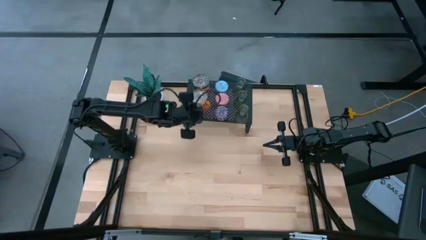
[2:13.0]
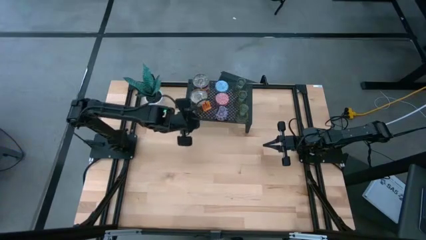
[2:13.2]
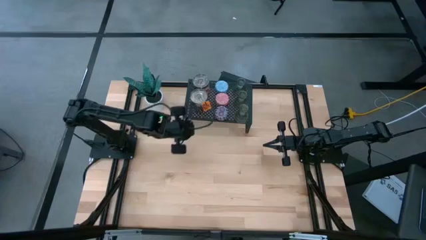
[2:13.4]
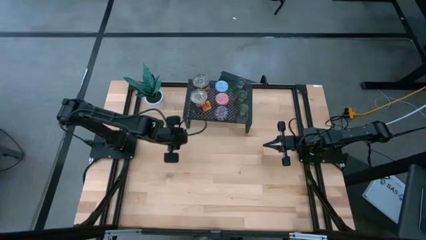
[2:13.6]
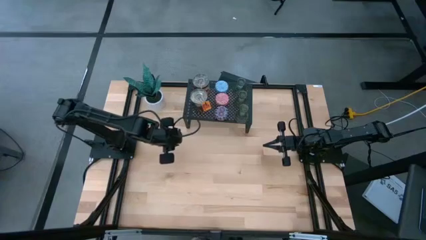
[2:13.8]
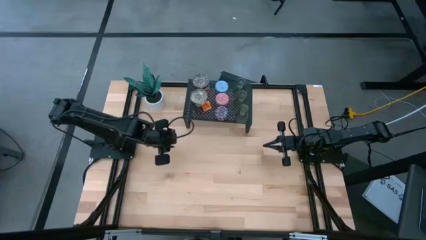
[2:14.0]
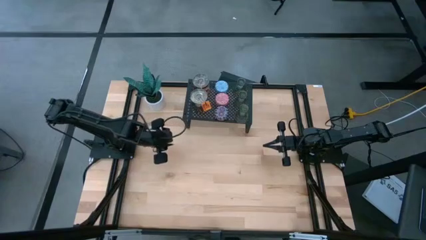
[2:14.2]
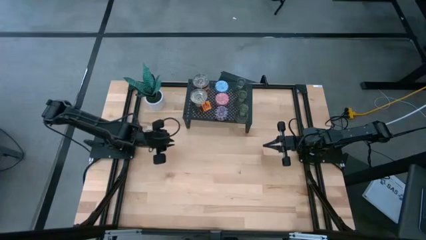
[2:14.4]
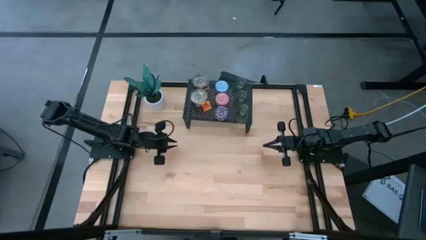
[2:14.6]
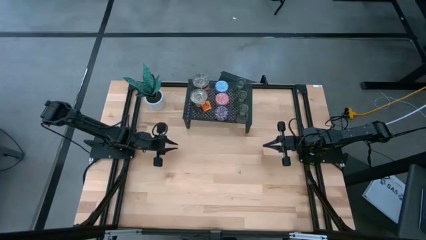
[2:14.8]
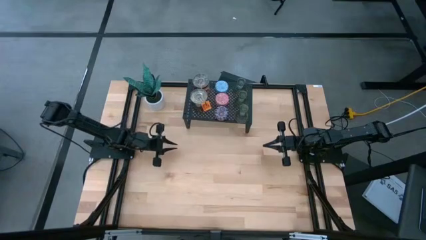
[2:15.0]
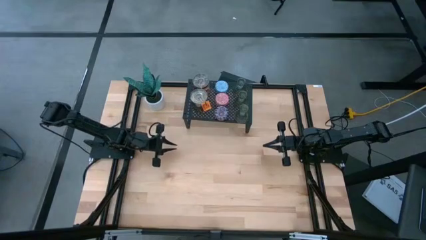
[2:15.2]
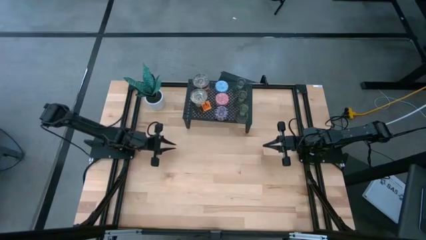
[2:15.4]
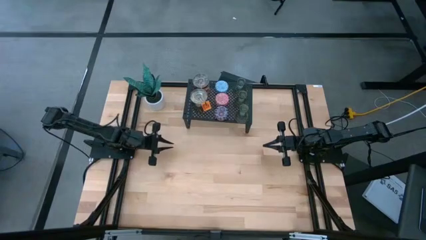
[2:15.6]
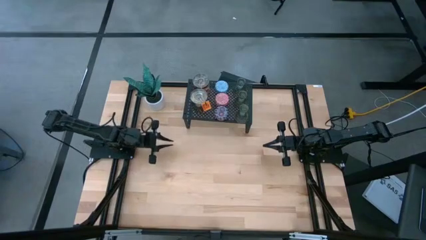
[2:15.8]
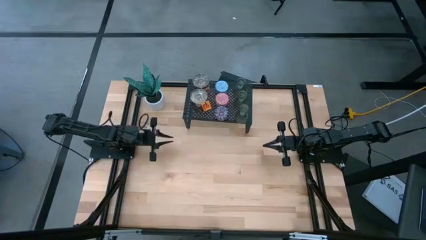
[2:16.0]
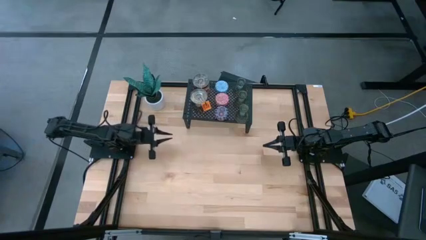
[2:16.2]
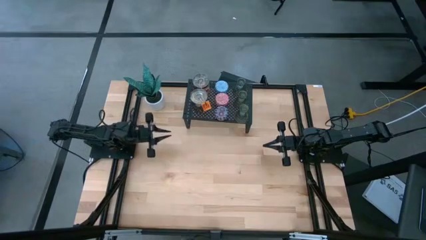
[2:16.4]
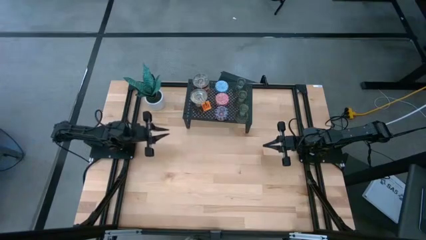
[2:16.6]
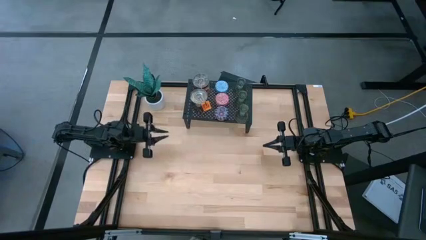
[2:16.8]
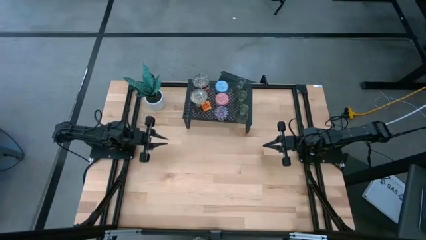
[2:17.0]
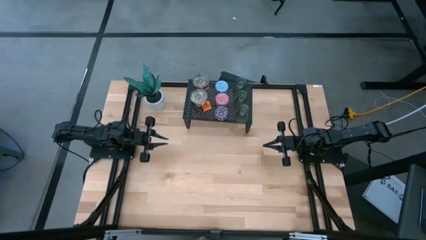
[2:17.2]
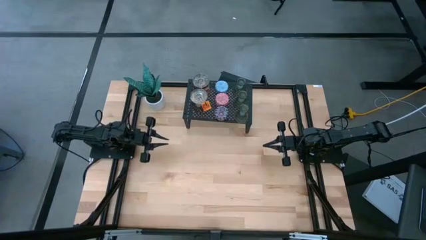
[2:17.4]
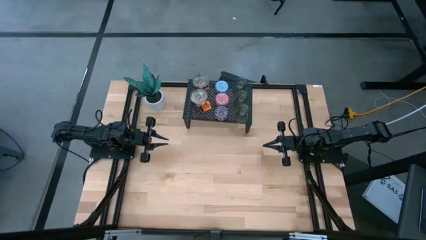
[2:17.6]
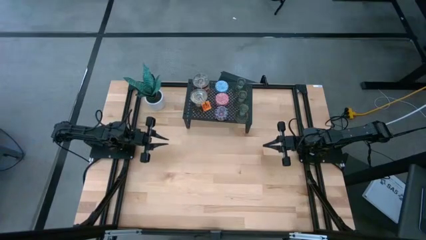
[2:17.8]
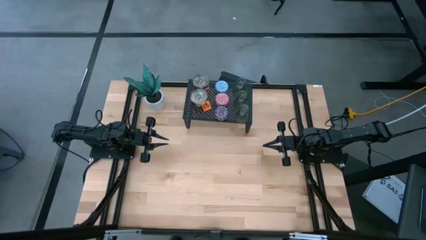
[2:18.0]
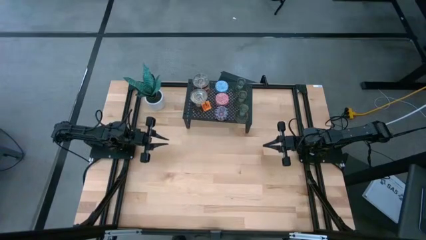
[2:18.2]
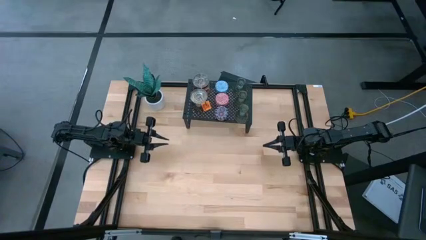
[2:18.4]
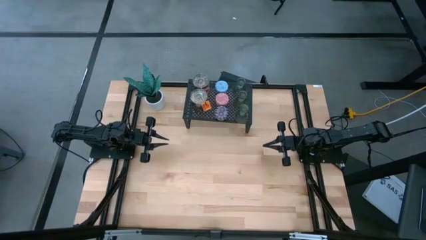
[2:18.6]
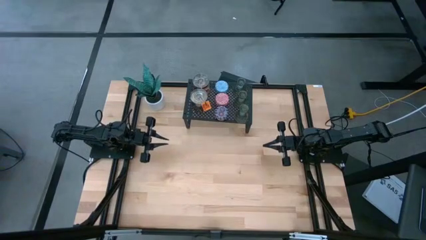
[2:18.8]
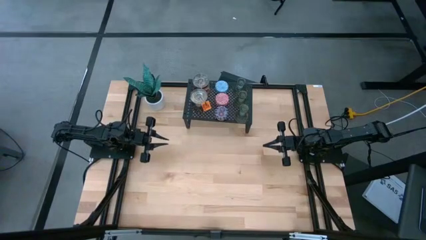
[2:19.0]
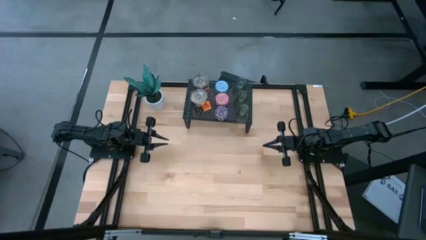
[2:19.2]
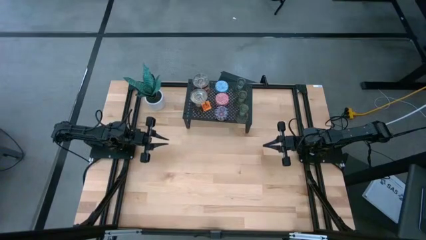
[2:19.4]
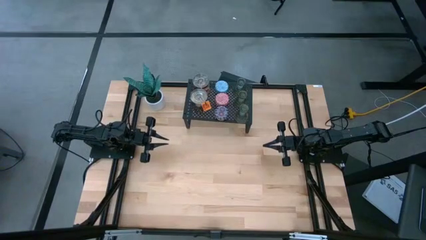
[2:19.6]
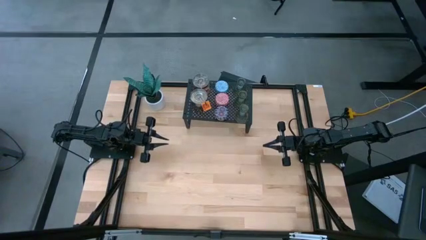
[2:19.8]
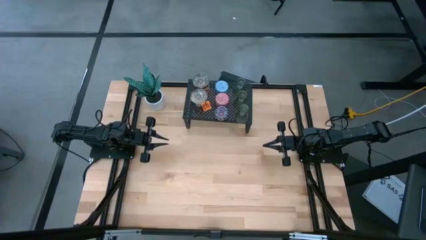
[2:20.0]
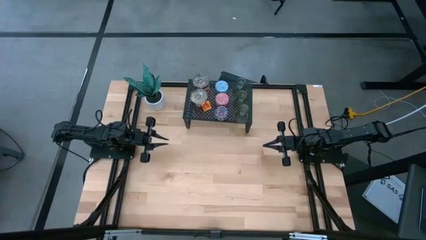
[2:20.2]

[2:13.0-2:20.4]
Task: Pick & Place candle stick holders
Return to Home Position
